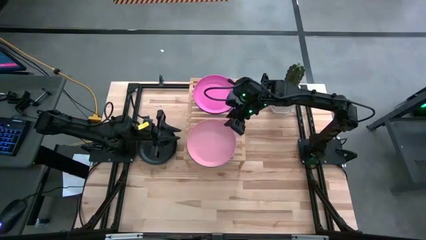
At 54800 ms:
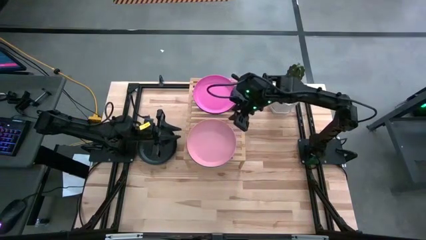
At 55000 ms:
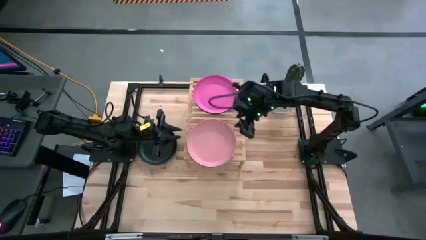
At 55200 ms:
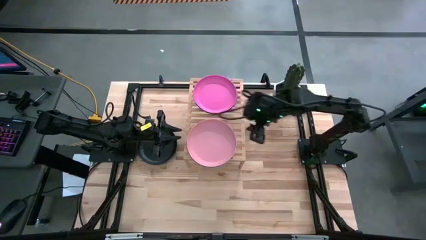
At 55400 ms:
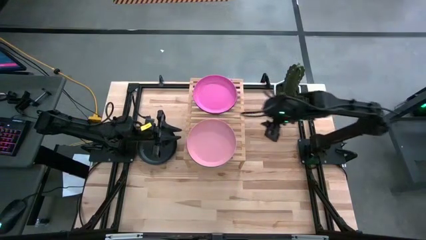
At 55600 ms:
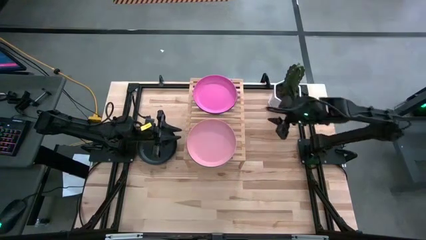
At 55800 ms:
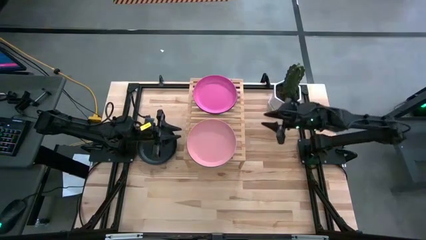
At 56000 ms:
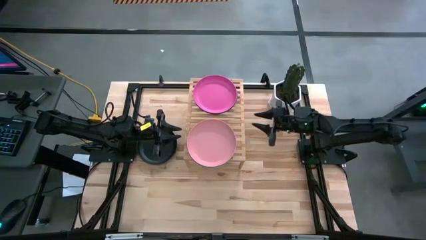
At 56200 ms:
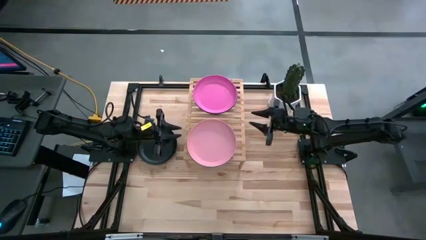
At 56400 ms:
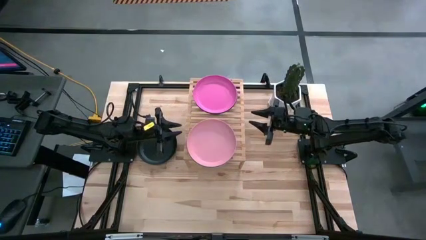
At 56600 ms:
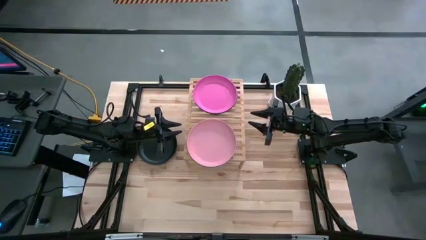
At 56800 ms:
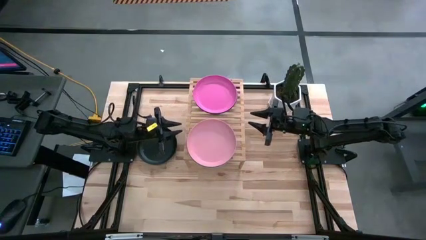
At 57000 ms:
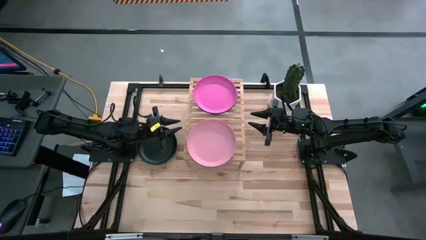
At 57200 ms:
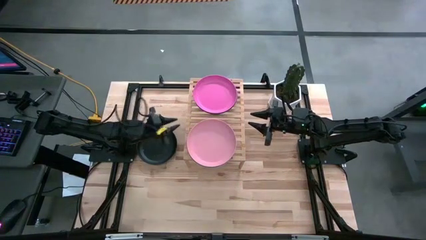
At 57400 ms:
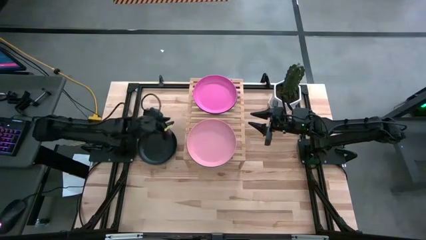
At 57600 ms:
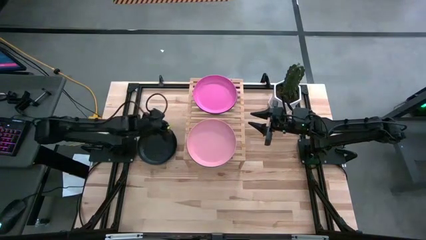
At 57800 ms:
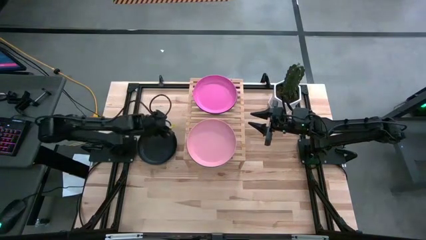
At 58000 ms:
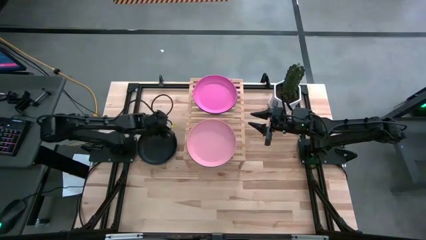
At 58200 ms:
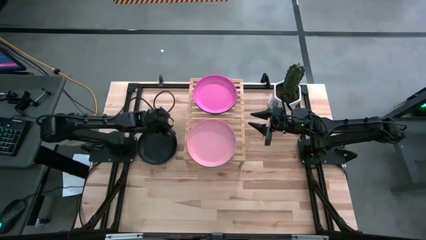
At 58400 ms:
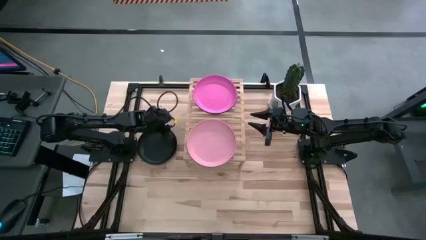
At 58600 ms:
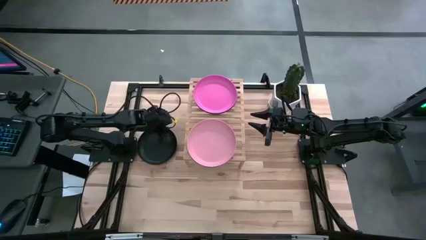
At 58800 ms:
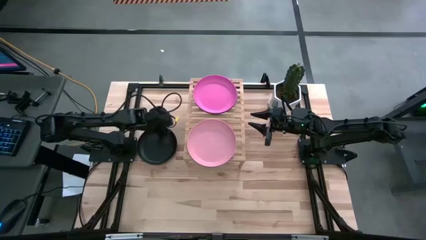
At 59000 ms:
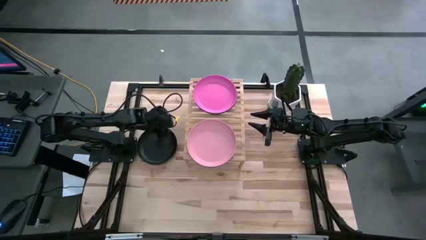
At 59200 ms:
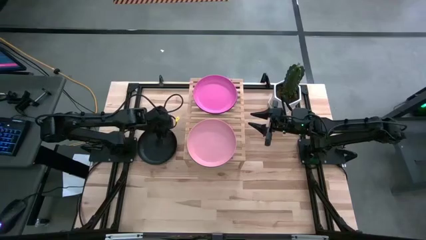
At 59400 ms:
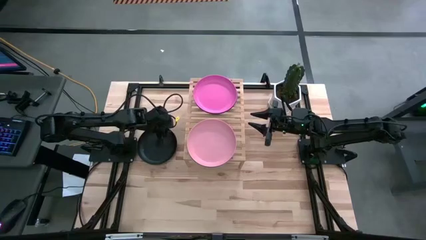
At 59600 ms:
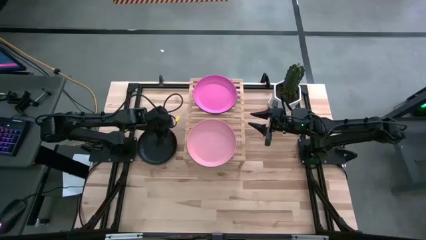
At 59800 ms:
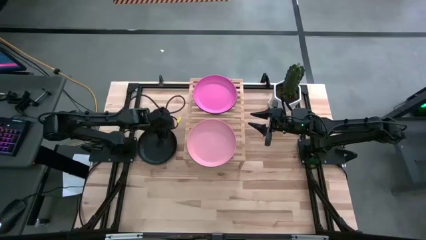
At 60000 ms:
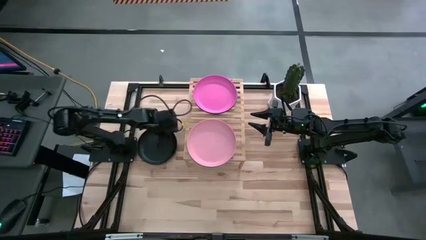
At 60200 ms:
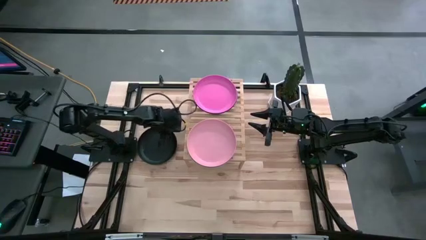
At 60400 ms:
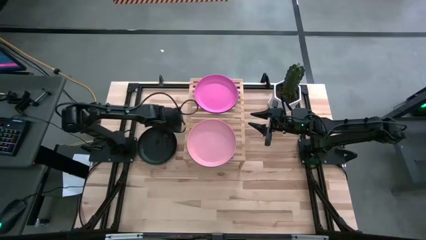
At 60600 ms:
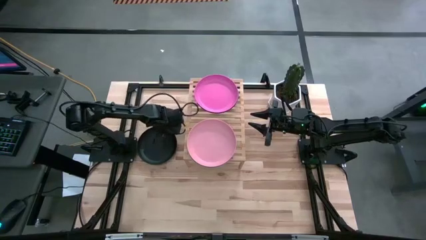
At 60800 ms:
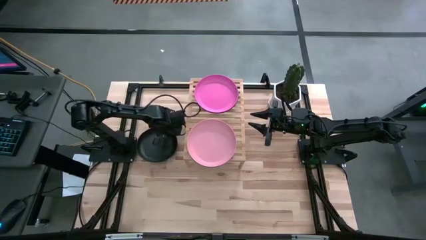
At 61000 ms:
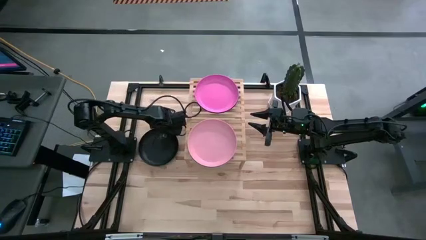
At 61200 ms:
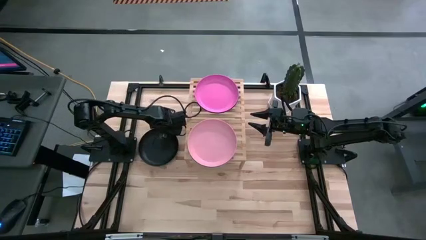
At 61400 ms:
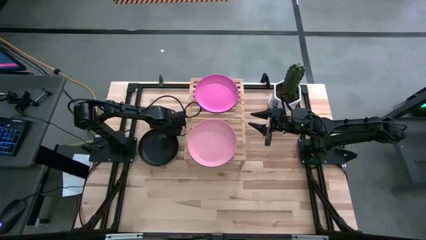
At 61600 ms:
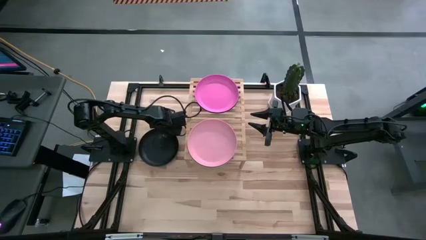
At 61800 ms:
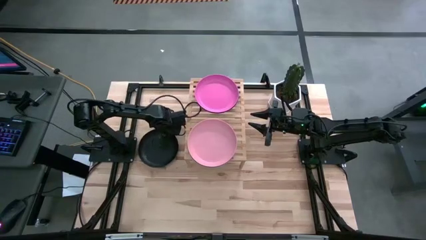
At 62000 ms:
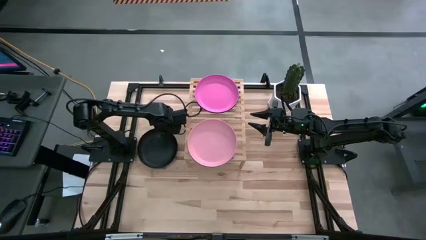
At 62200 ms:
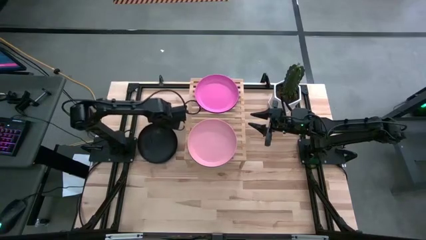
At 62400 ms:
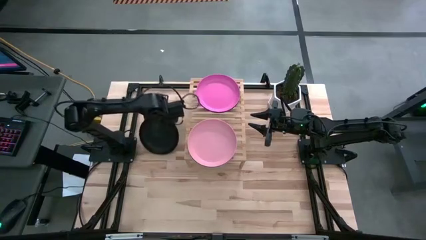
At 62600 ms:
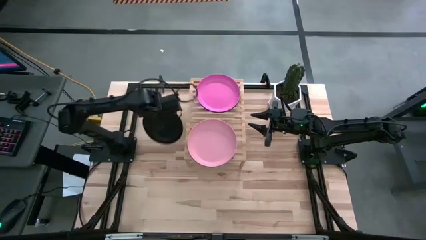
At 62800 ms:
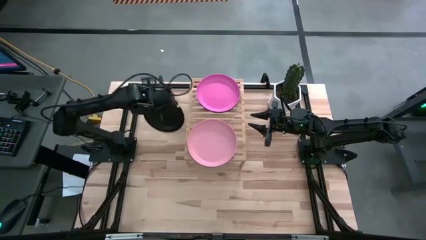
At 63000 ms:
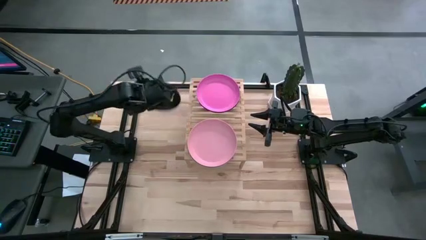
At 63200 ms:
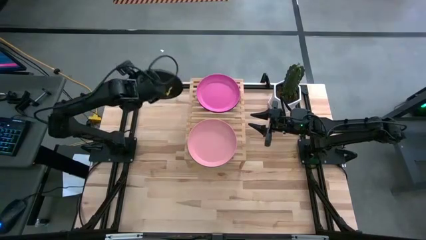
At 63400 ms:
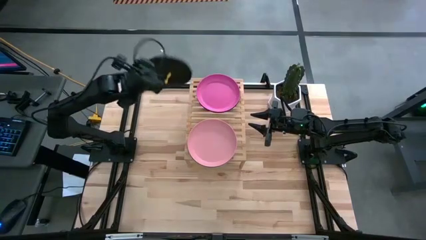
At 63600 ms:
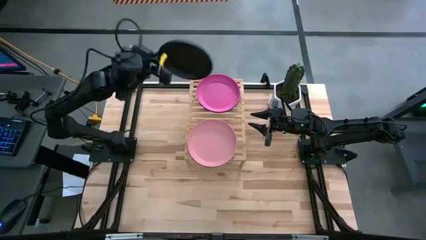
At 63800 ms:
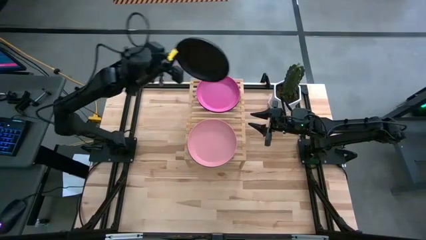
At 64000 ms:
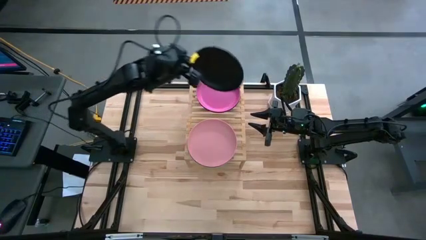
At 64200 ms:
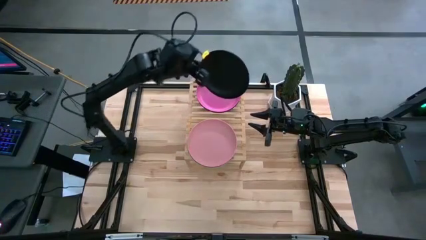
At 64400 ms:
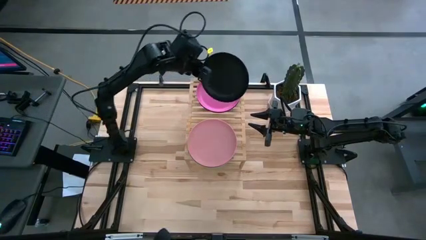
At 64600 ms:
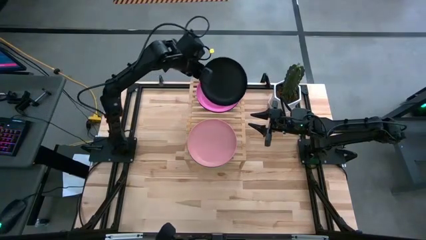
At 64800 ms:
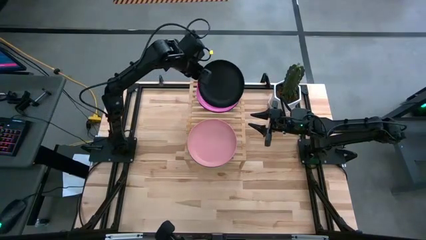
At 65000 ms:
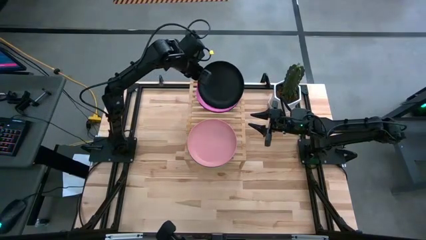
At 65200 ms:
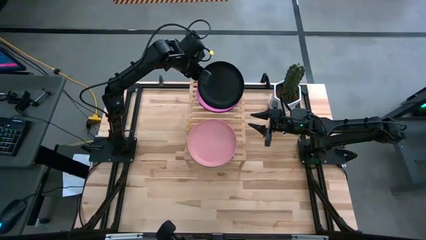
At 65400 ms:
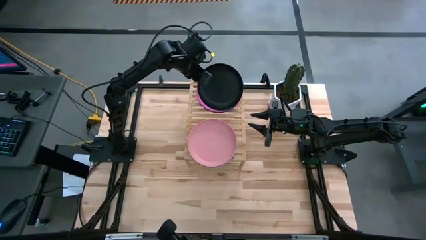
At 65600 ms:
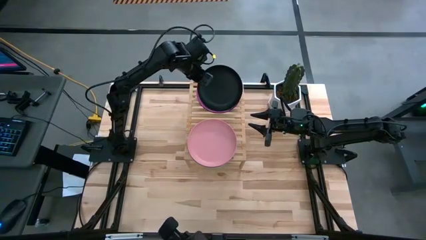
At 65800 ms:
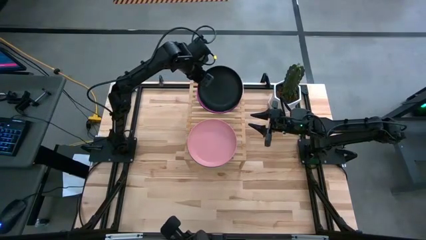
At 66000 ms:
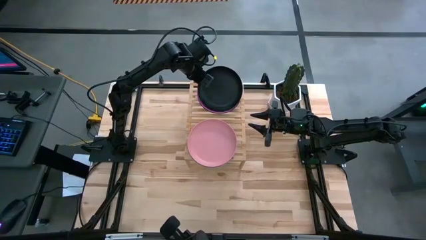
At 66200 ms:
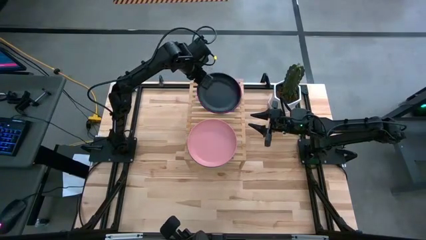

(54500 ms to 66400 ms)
Task: Place and stack plates onto a shelf
Stack the black plate on top of the pink plate on the shelf

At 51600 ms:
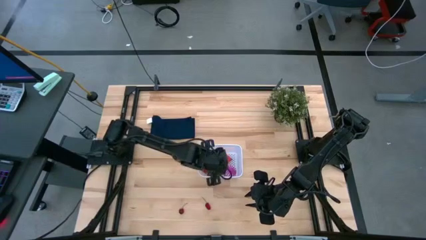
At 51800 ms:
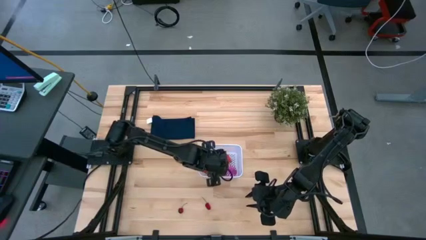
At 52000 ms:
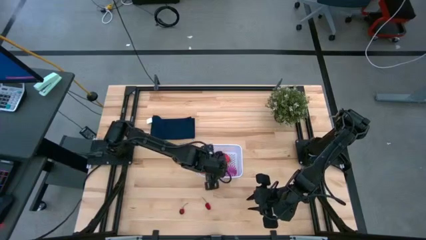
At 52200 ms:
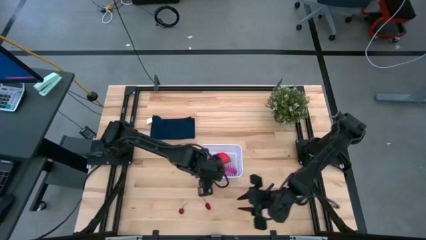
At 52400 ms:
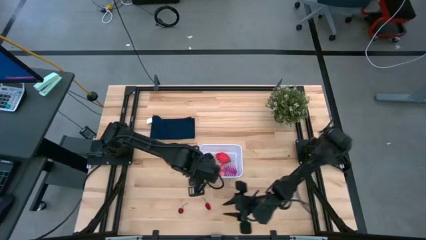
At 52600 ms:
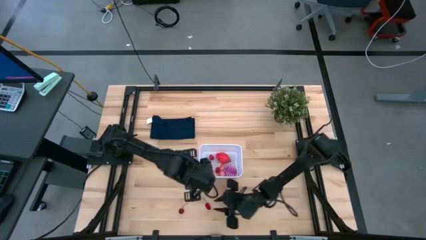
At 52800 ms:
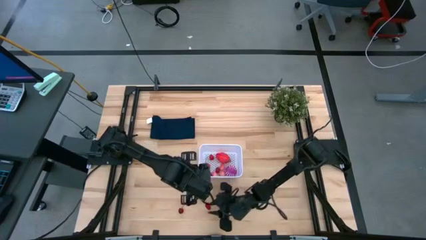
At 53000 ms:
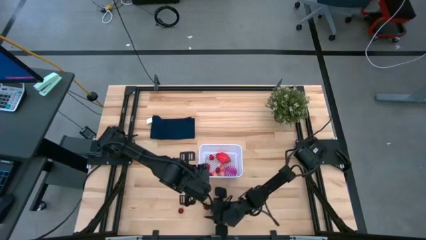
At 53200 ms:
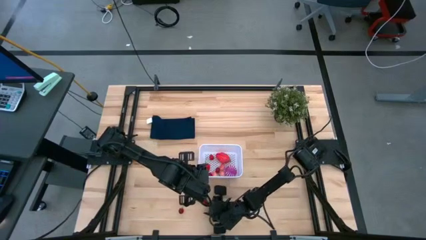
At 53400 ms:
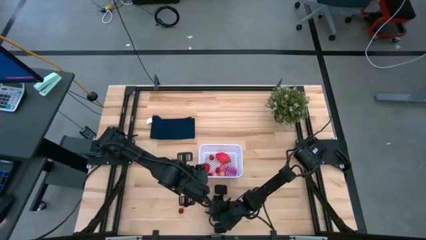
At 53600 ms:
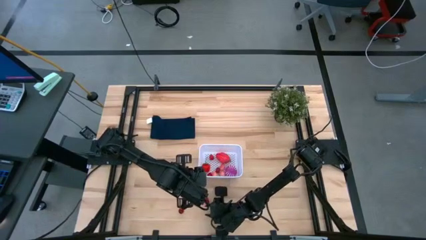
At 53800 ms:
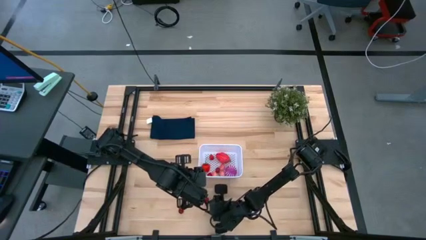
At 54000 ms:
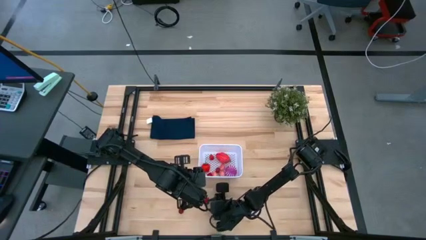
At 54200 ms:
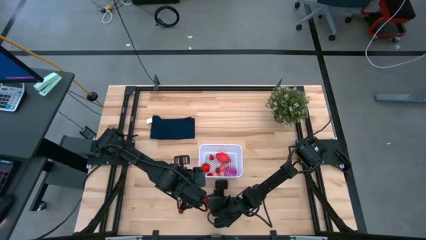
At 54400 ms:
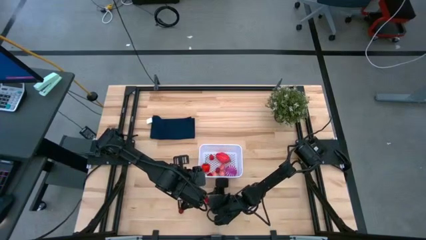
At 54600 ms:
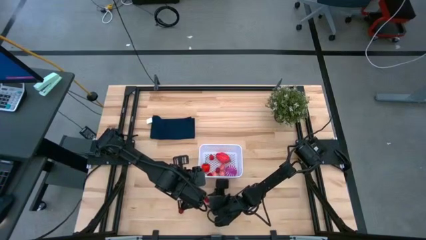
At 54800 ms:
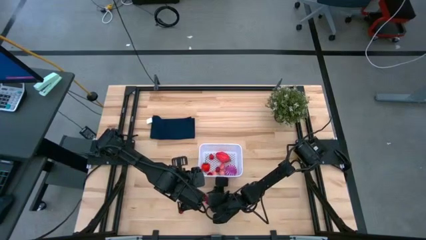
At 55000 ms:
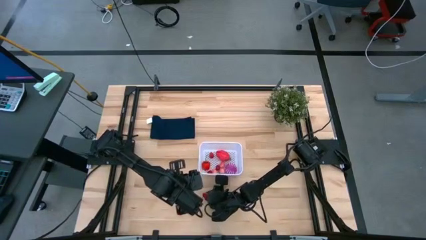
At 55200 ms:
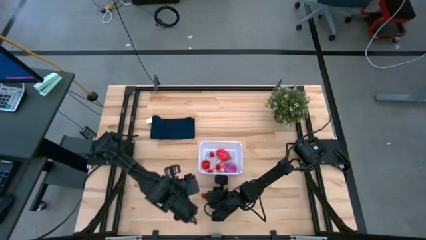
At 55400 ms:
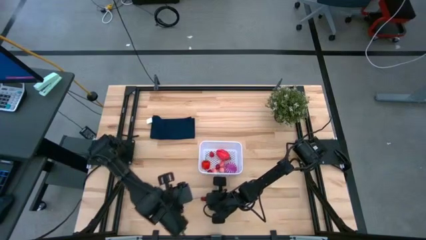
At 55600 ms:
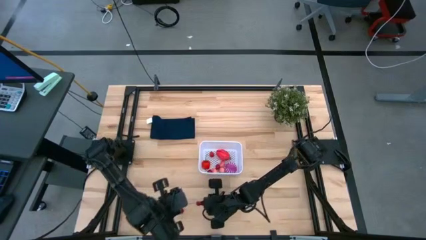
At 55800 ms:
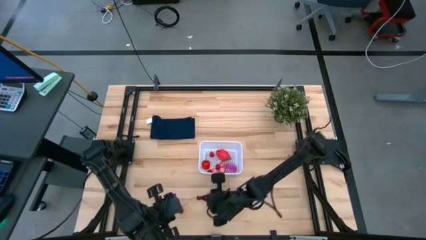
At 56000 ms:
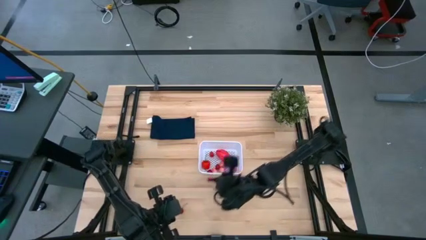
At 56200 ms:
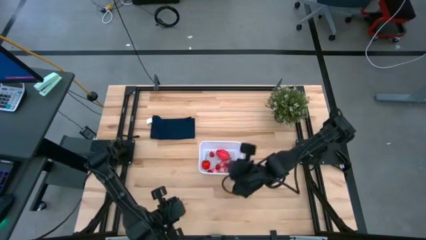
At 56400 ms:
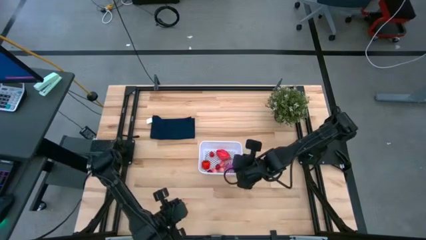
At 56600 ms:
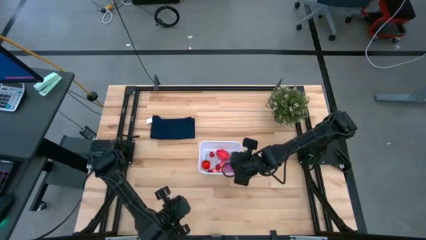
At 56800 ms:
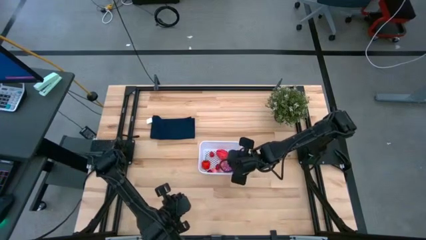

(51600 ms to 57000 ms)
Task: Pick and placing Produce into tupperware
Put the cherry into the white bin
